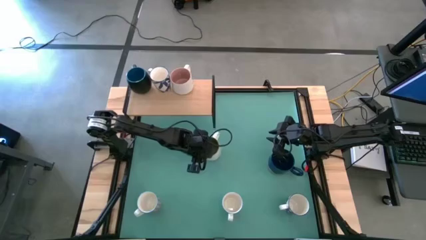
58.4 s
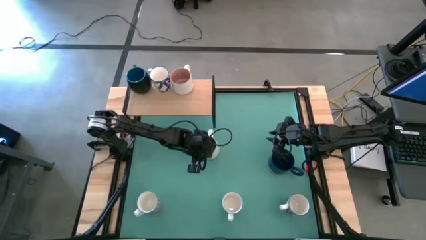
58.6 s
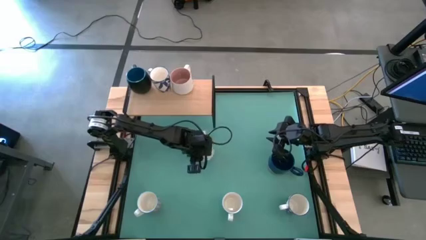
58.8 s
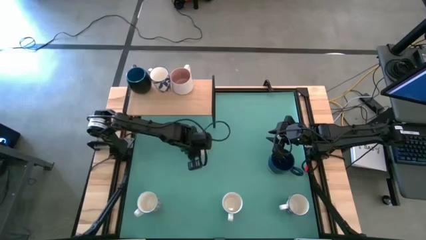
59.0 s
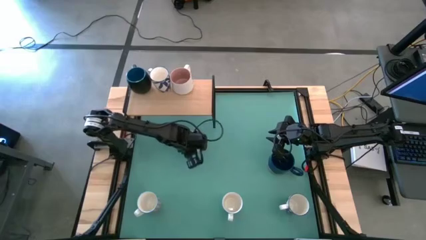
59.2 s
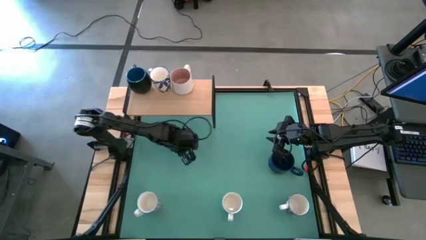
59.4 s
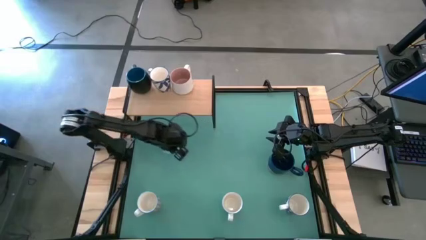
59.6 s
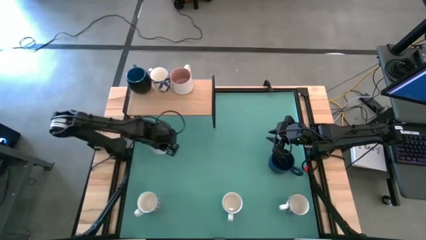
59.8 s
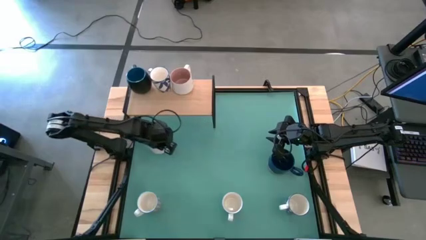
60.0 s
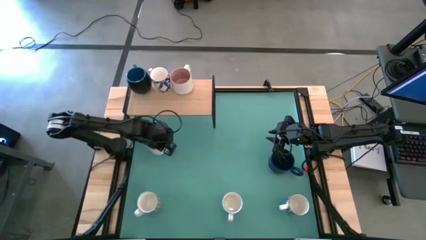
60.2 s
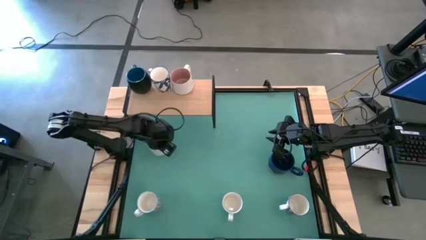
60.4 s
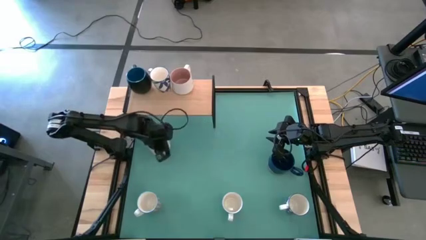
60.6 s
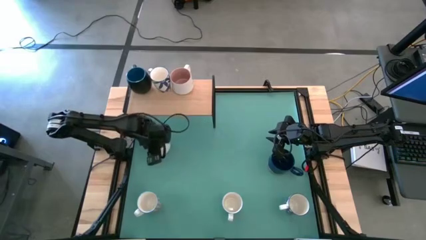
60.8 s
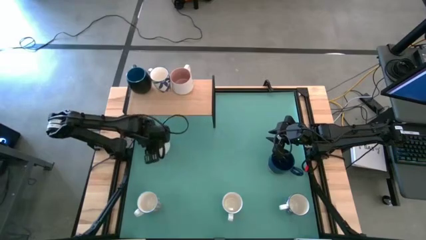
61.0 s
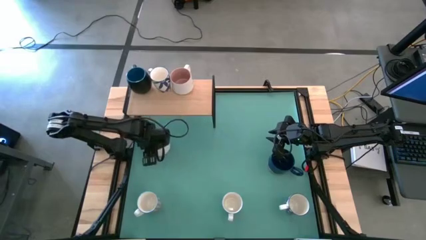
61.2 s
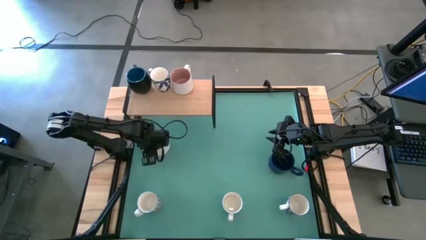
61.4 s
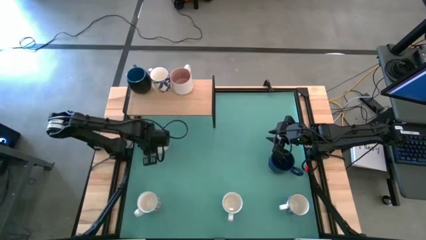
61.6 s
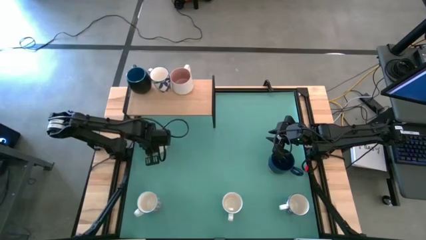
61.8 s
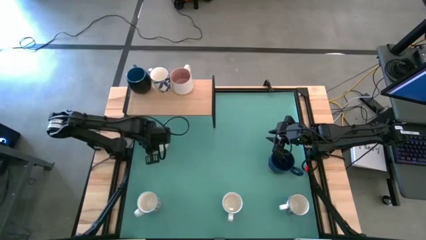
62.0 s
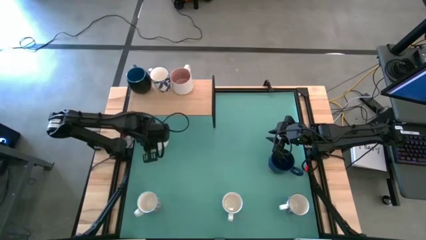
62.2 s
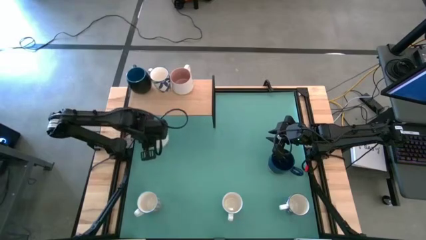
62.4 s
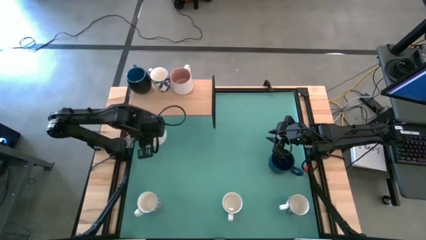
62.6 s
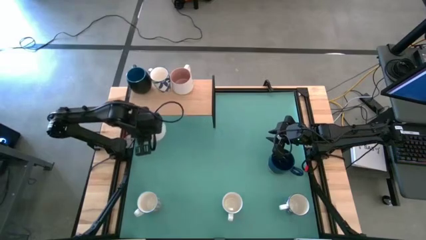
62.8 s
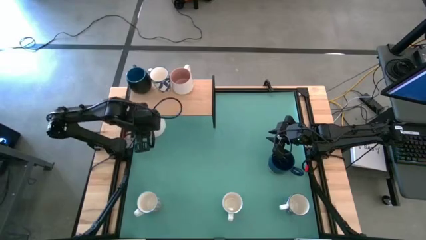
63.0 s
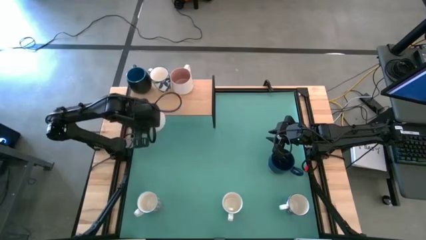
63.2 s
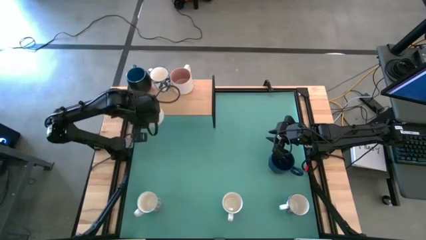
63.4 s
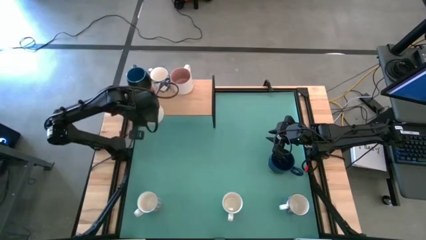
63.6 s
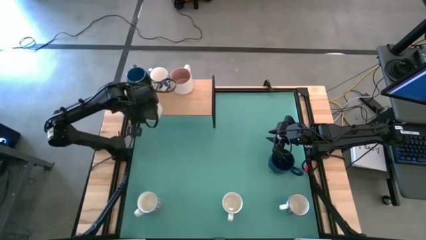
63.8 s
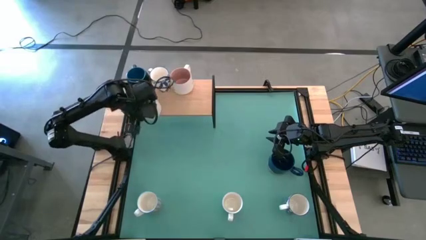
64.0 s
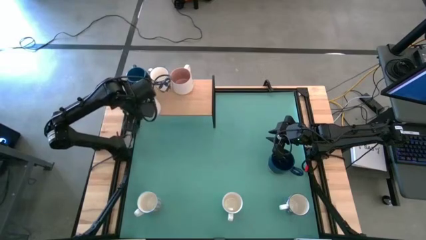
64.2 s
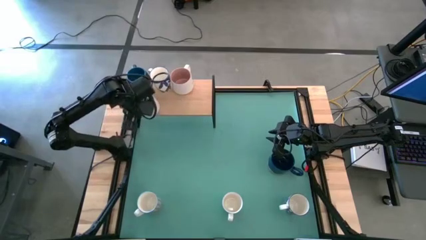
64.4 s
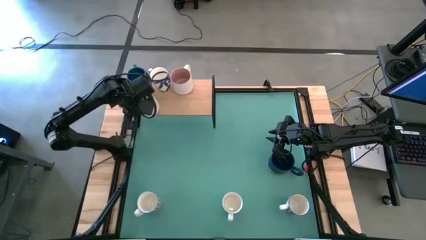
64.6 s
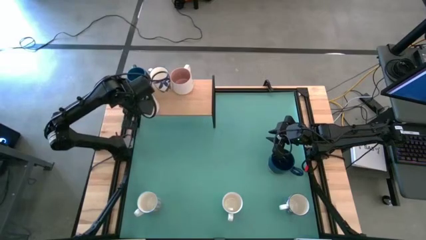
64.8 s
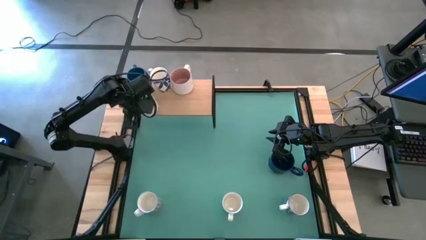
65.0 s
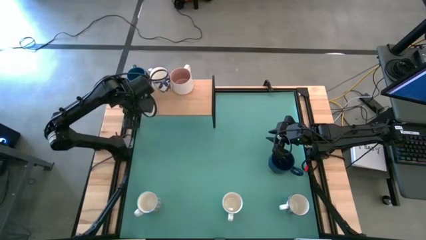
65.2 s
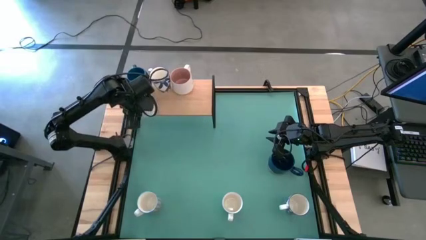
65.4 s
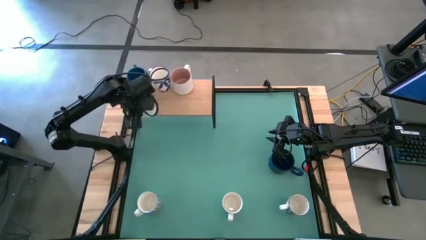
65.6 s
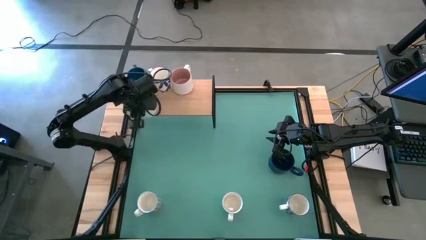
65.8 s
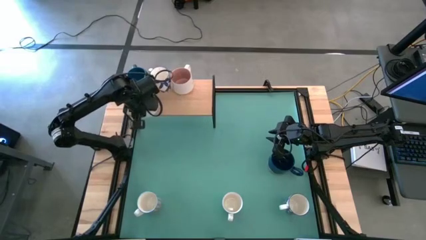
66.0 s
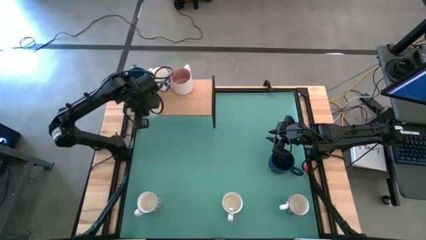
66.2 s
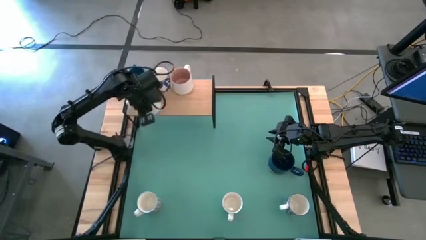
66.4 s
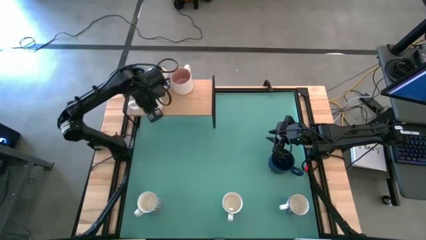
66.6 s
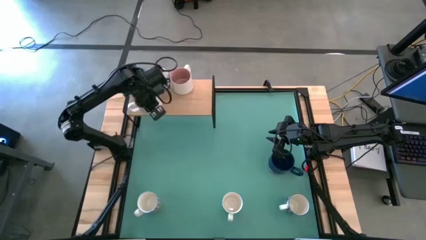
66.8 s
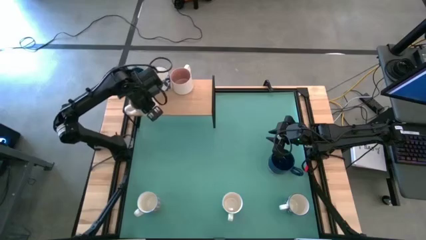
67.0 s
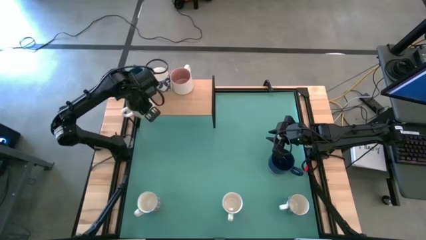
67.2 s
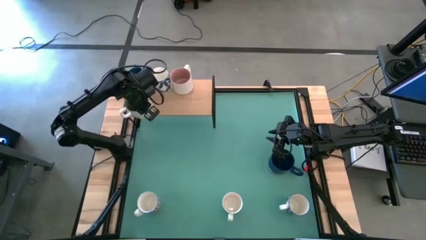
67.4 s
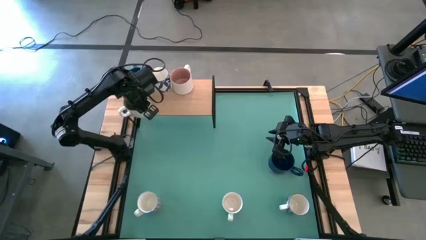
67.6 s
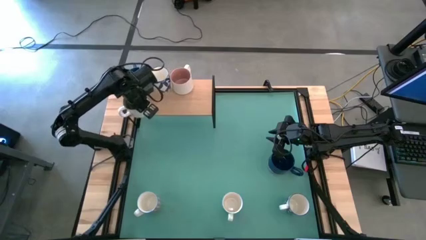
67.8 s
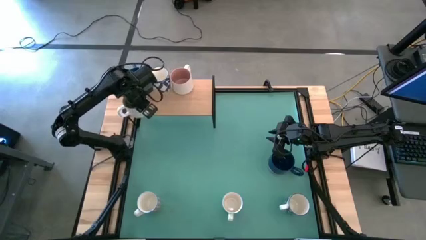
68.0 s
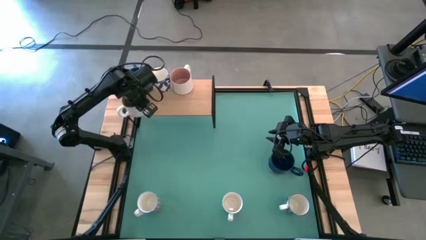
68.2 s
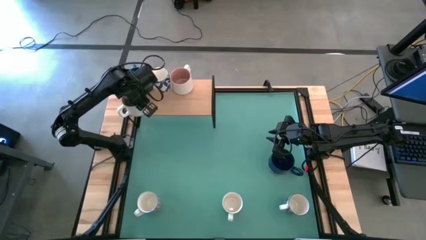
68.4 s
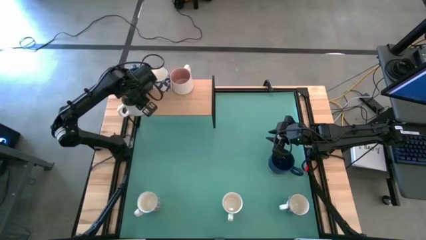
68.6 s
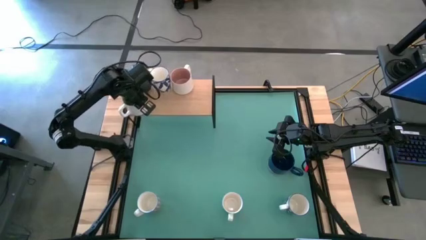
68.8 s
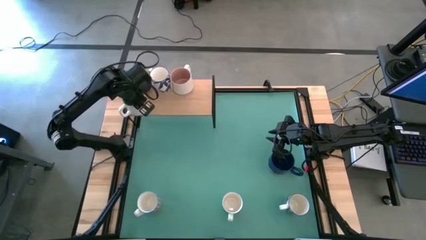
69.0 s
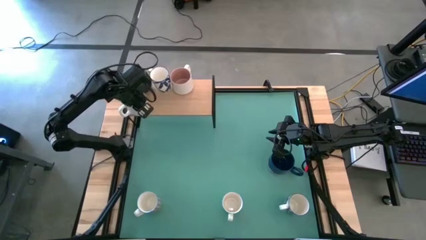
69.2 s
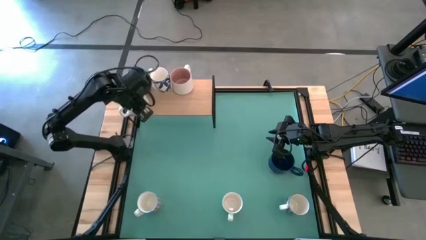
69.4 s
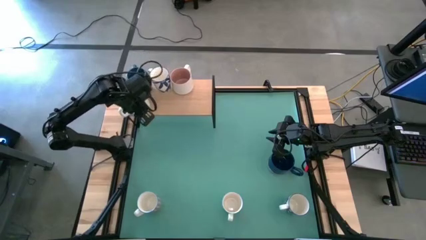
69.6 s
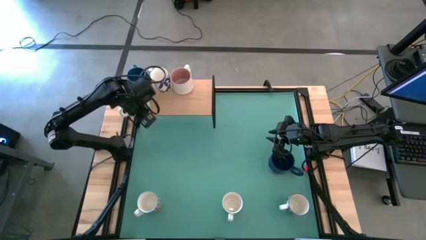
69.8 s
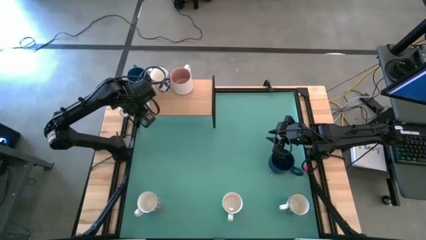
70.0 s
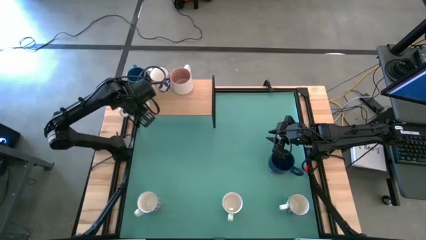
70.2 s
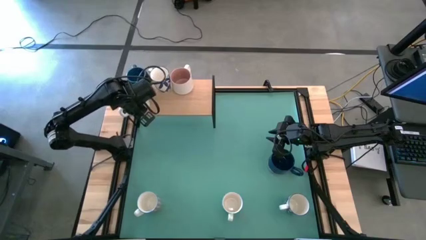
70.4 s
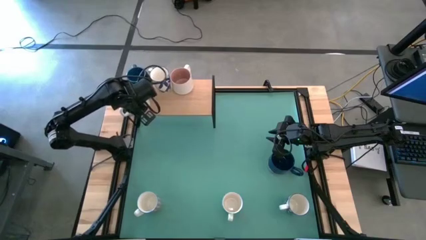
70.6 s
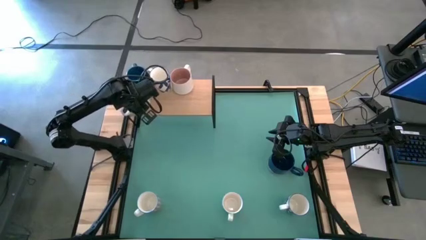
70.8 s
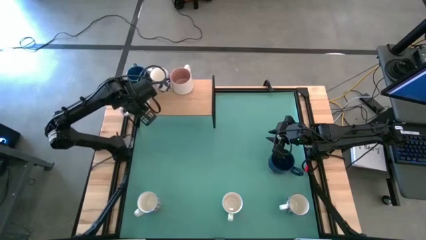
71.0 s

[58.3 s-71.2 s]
Task: Place coffee mugs
Put the white green mug on the shelf
